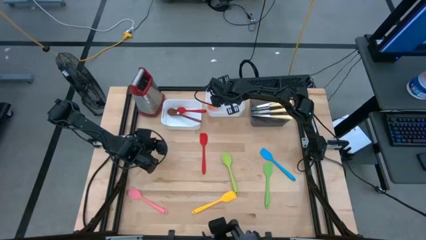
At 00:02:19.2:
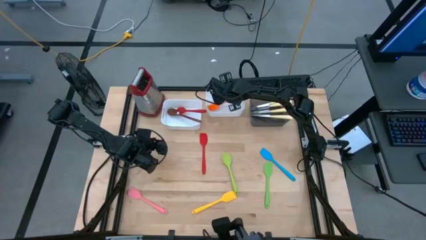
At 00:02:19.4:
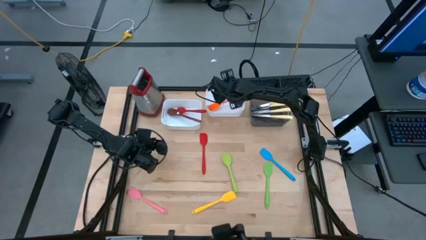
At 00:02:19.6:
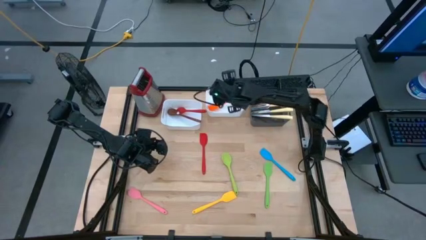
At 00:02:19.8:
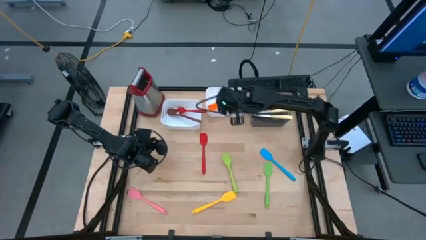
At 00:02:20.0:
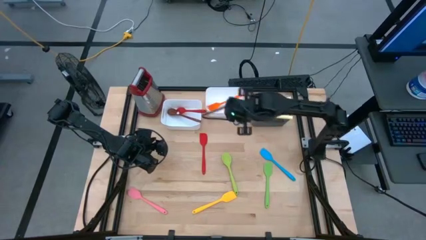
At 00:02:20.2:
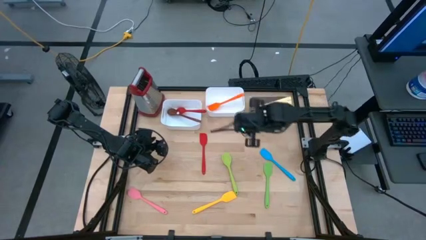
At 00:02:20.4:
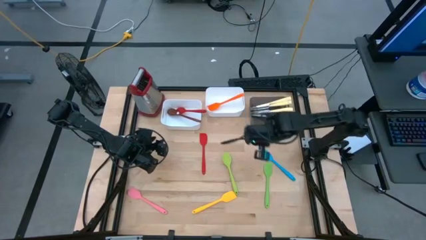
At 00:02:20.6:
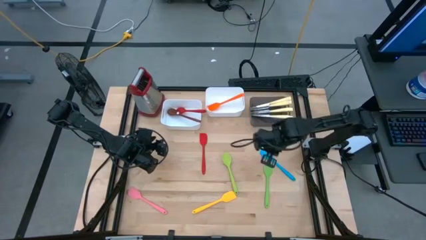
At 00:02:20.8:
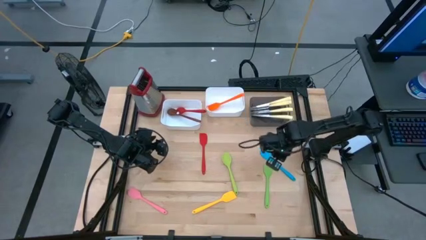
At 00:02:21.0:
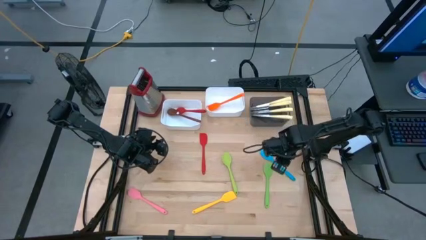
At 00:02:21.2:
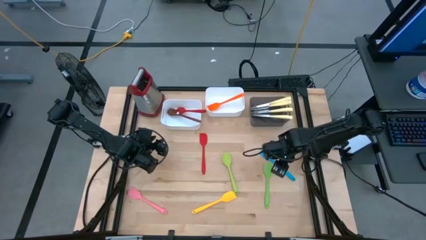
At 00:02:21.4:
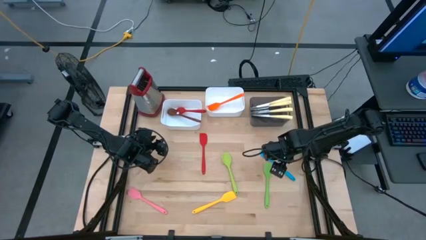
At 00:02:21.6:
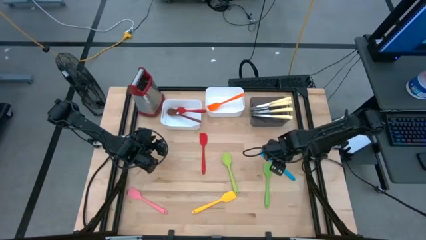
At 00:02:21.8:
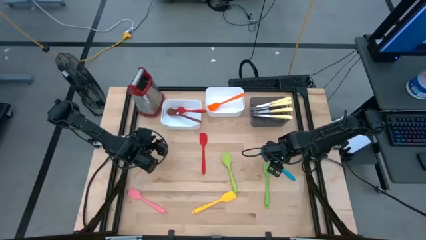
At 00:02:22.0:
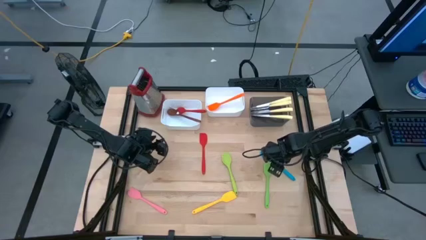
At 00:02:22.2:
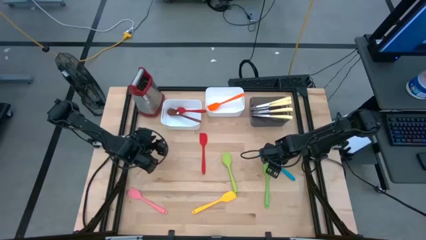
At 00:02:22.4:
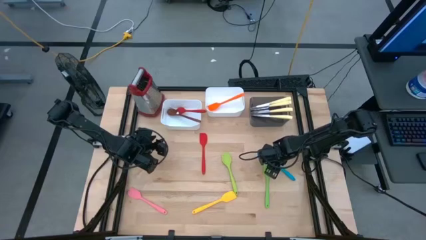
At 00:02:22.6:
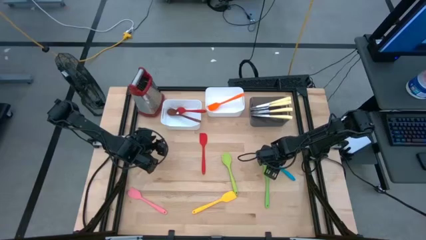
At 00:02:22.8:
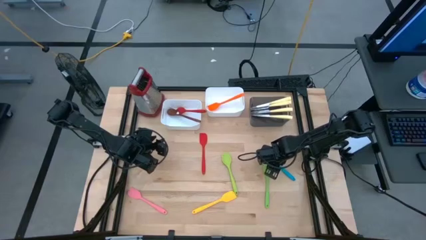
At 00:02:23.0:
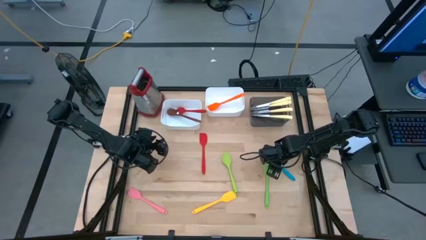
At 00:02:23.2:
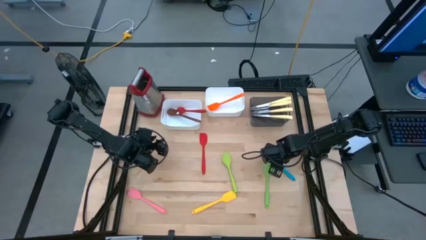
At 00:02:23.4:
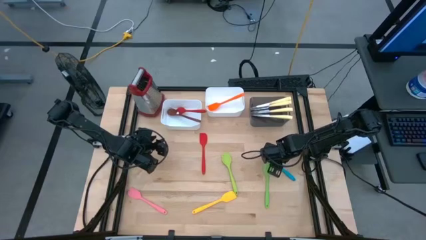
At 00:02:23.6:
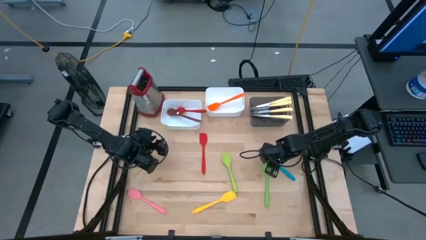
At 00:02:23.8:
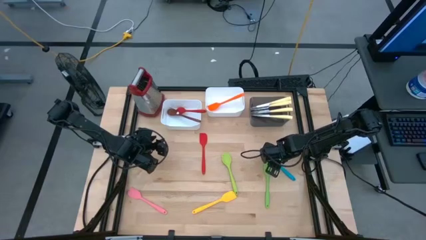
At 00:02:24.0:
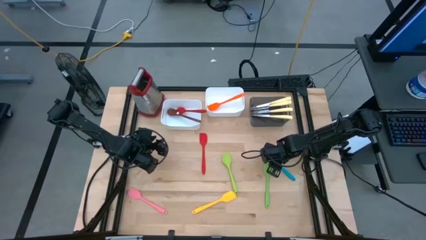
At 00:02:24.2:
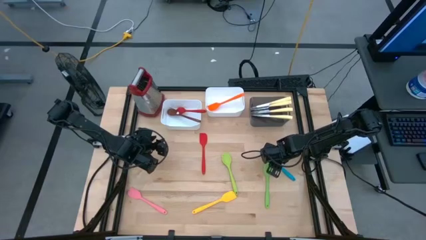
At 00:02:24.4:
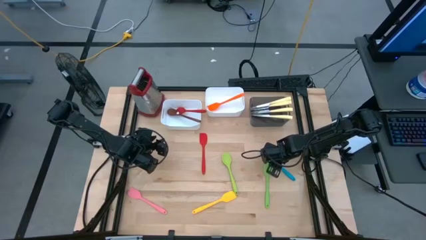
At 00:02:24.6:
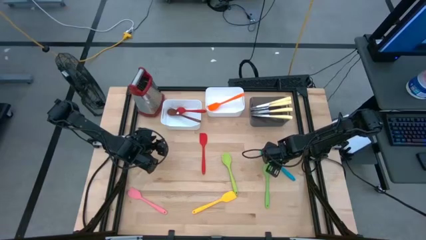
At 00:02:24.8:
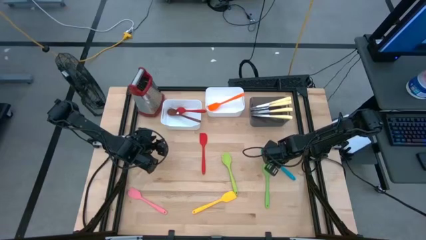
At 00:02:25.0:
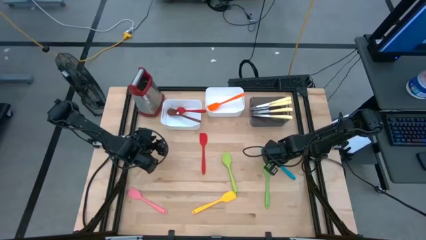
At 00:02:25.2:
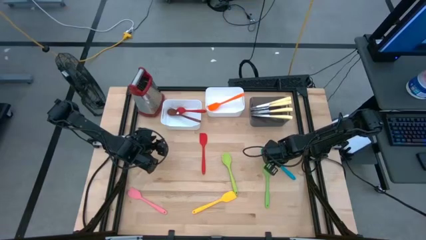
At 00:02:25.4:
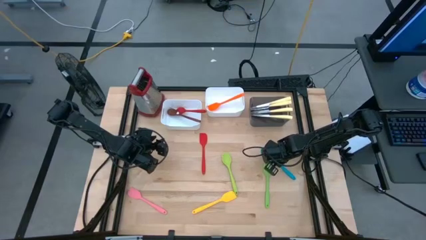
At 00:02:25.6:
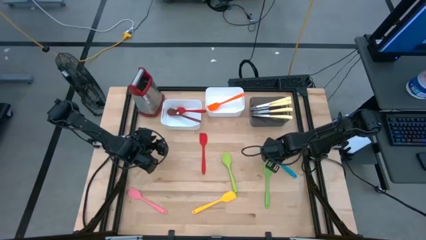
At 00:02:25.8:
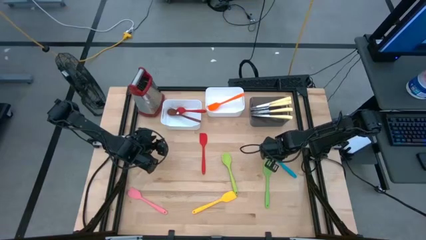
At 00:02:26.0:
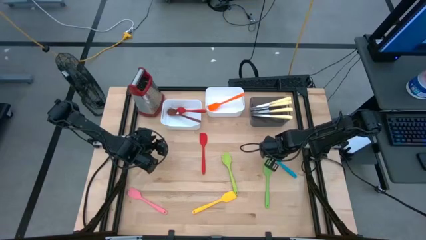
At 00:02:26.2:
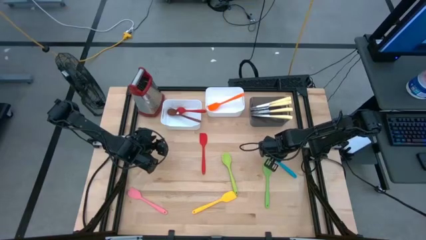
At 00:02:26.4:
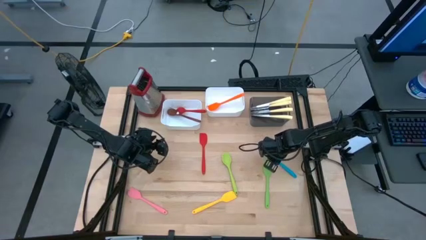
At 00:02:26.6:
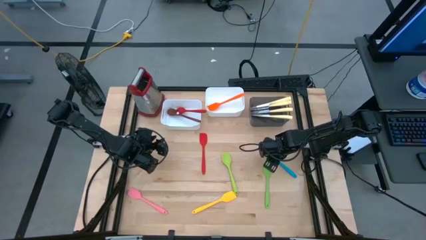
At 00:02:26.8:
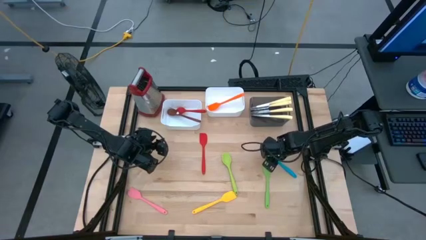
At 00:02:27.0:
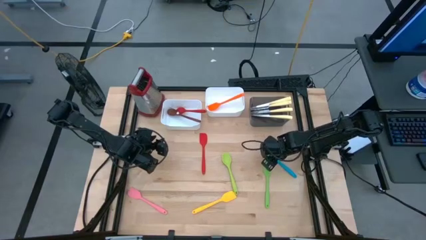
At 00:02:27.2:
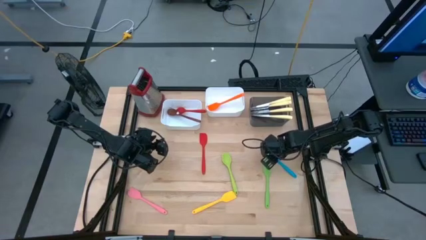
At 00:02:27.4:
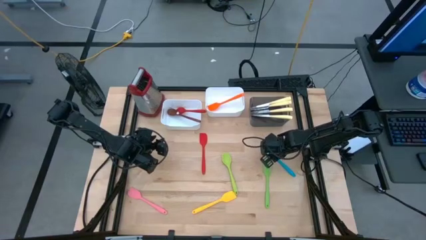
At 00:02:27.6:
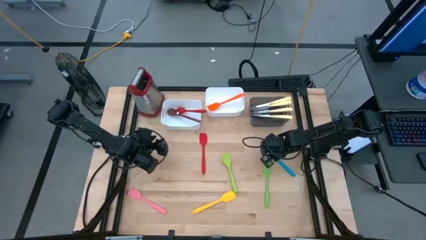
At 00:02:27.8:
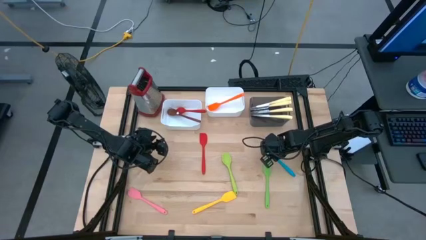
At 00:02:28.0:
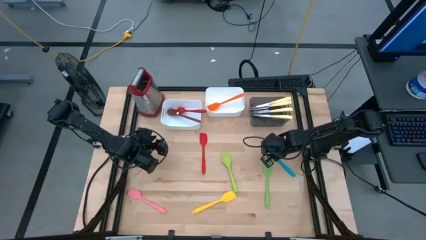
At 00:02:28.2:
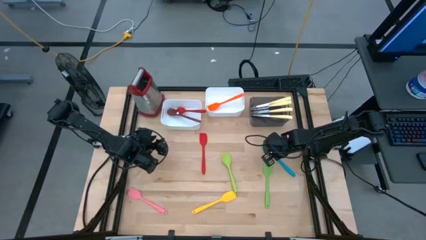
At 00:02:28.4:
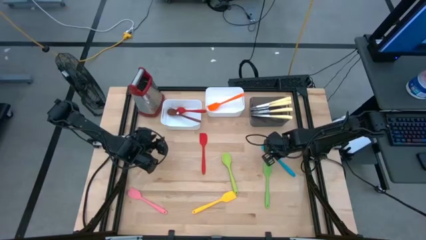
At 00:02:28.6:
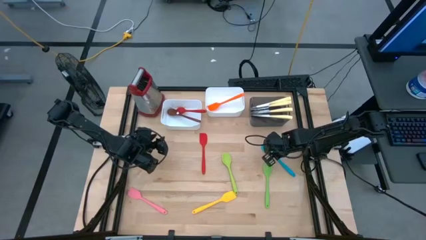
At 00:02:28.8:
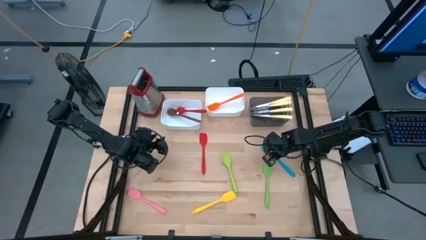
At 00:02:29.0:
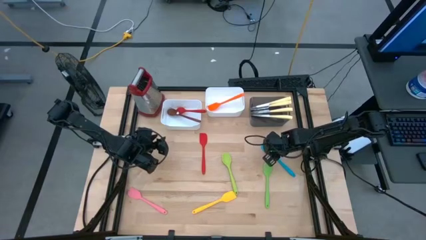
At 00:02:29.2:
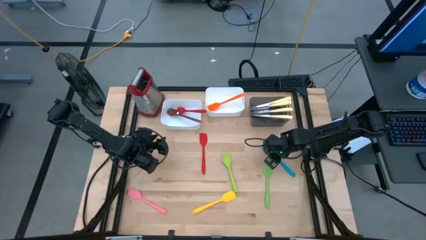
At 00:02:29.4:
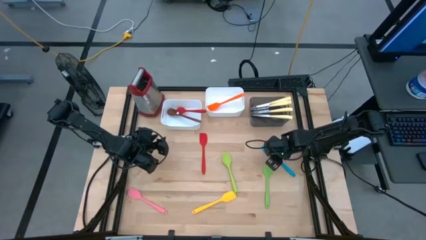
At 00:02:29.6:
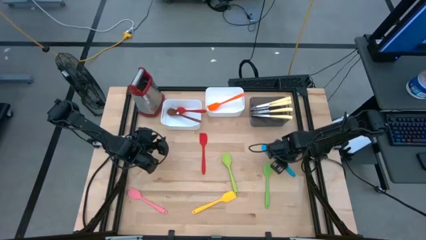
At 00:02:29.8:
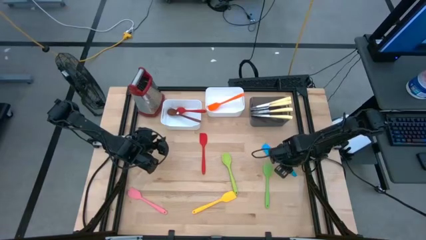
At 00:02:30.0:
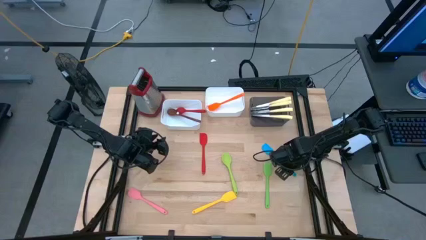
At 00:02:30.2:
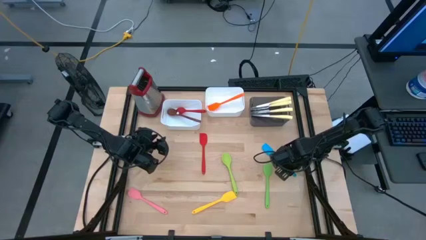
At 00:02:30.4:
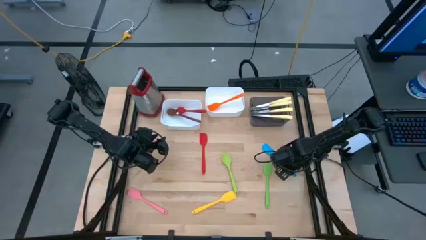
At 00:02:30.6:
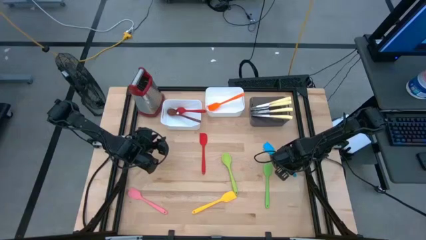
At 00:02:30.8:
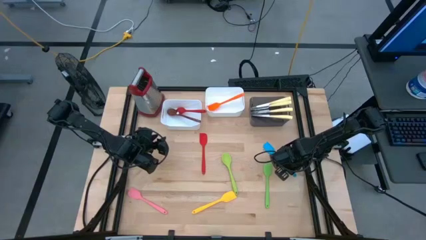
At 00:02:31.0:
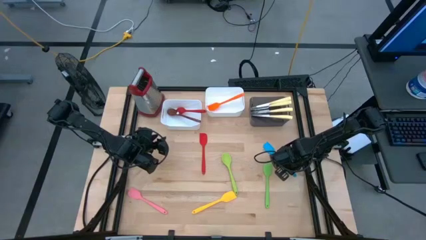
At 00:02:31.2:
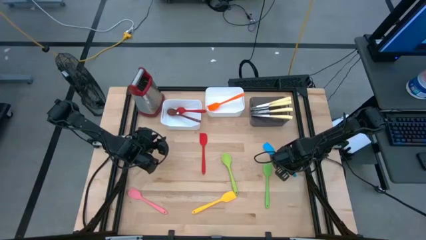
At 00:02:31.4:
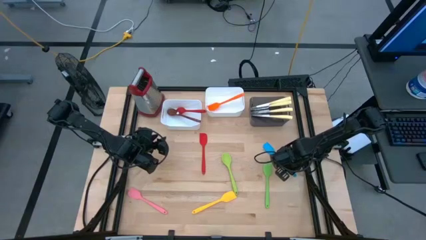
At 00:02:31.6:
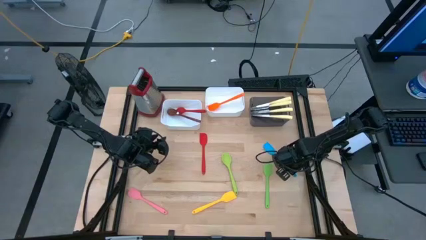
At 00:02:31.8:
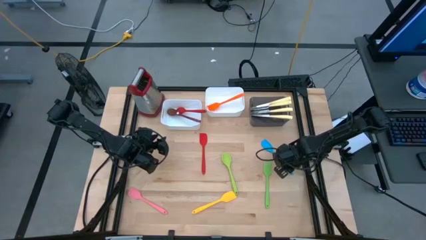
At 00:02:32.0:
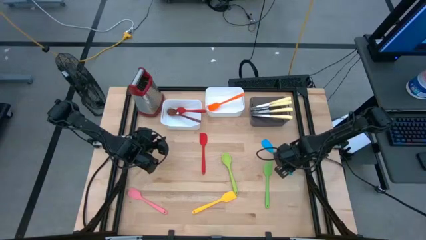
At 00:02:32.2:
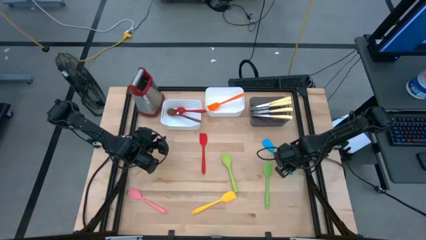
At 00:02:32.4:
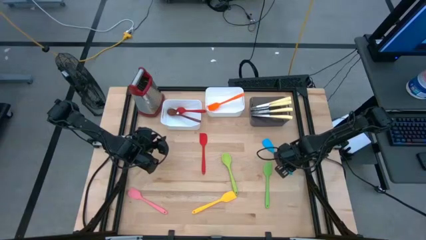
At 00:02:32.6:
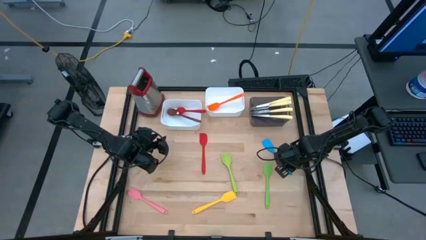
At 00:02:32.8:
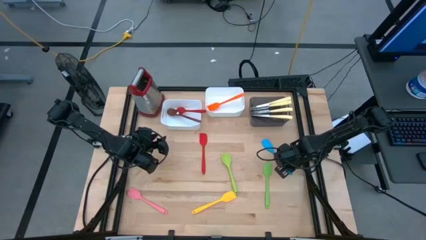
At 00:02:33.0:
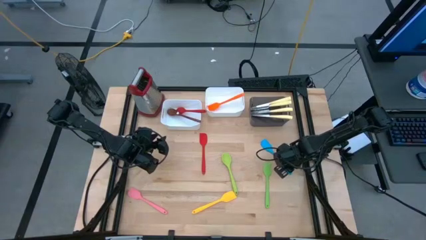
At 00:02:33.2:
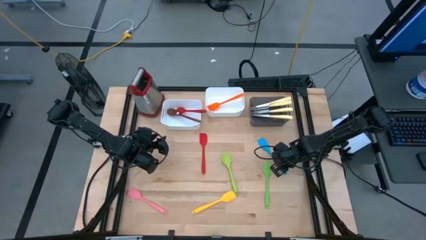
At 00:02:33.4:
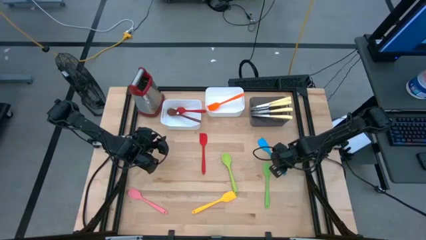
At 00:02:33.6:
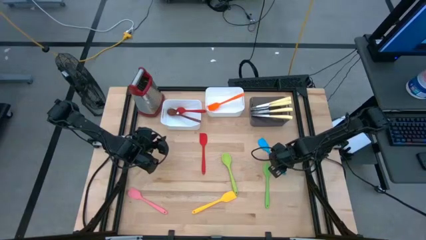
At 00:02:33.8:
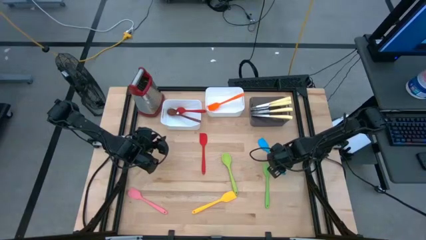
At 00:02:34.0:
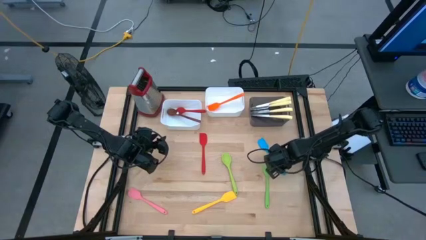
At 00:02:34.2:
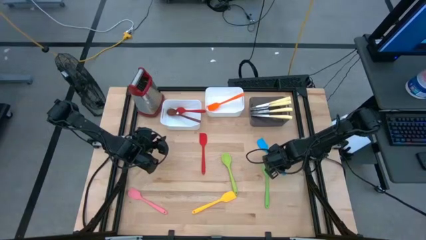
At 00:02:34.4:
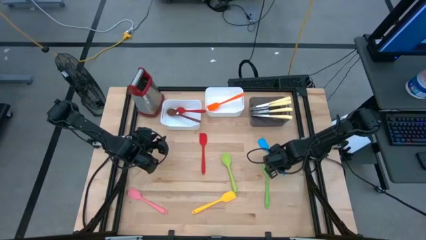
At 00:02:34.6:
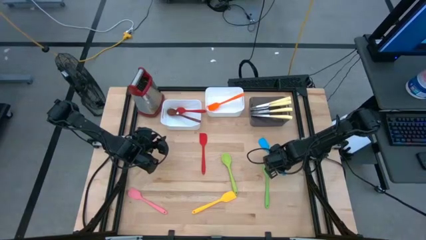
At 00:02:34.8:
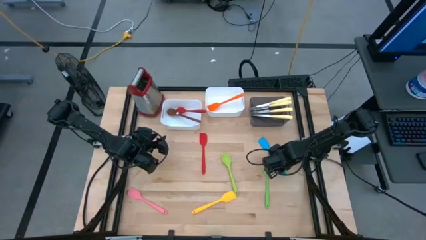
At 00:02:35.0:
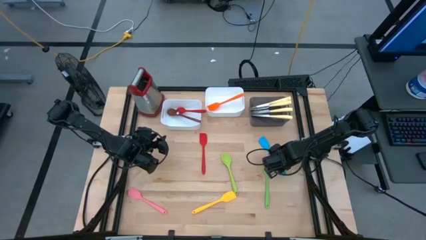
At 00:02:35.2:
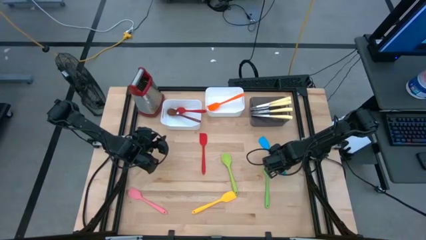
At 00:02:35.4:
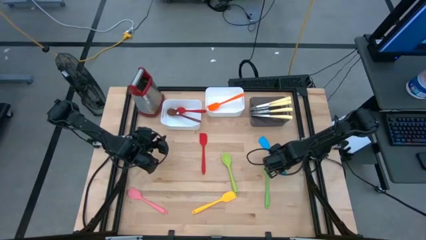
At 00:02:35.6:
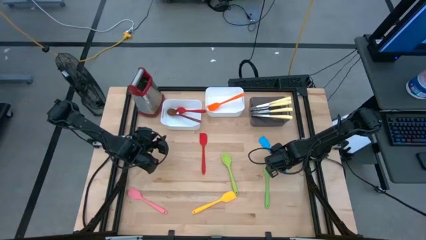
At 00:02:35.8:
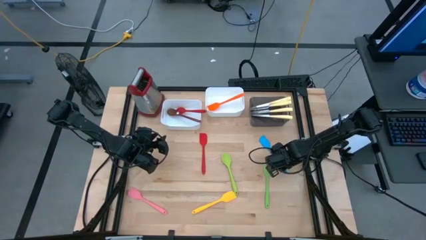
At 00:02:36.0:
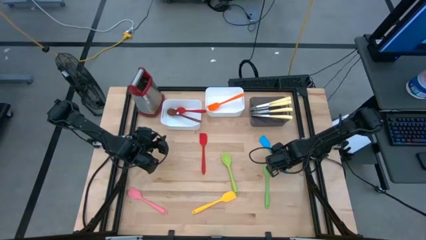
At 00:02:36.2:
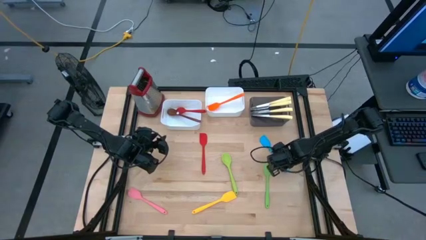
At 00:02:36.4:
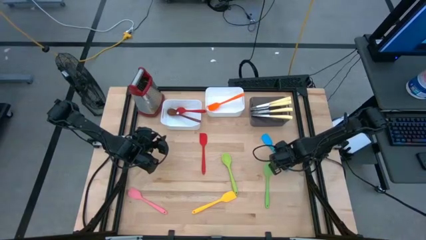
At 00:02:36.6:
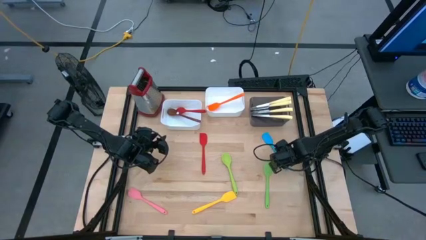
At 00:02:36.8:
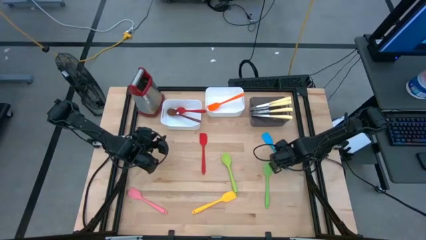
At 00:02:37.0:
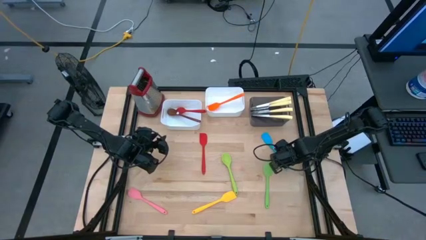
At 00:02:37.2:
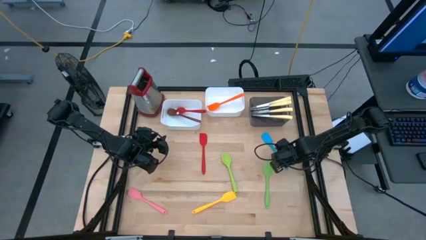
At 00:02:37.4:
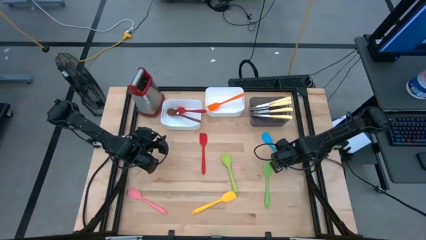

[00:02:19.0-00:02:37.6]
Task: Pick & Place Kitchen Items
Put the blue spatula into the right white bin
